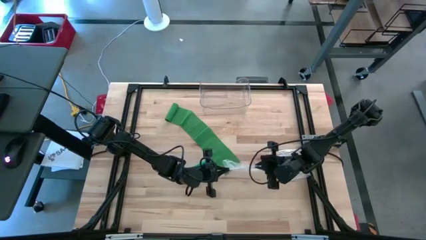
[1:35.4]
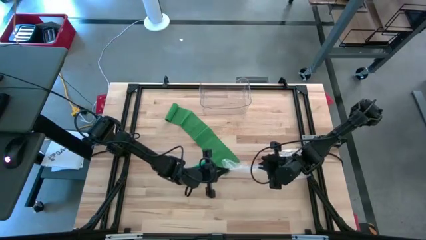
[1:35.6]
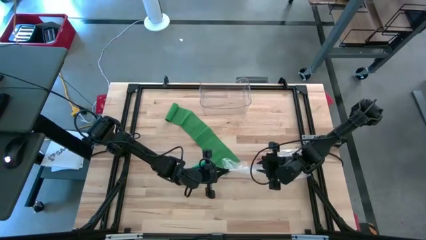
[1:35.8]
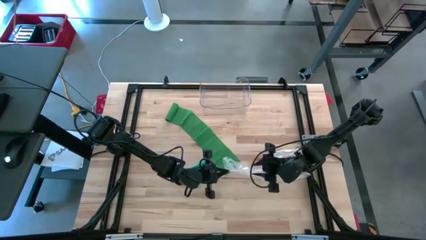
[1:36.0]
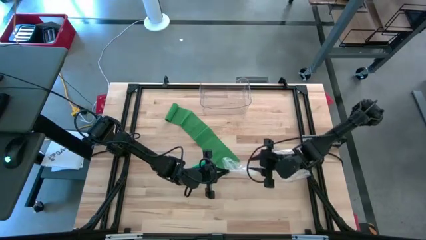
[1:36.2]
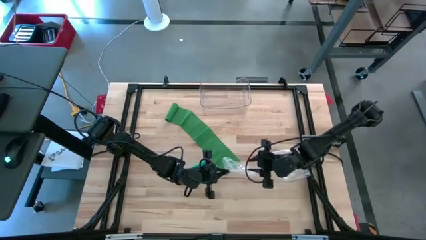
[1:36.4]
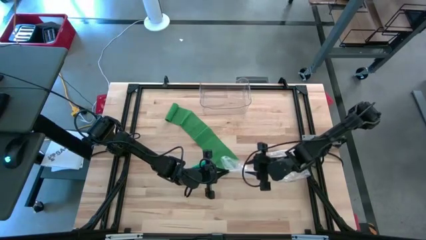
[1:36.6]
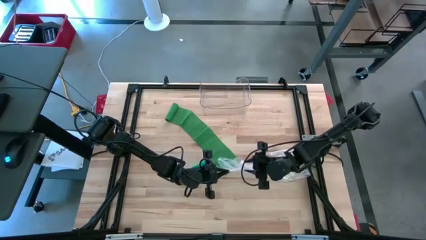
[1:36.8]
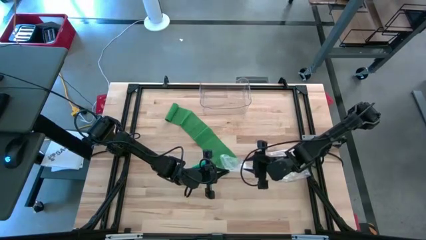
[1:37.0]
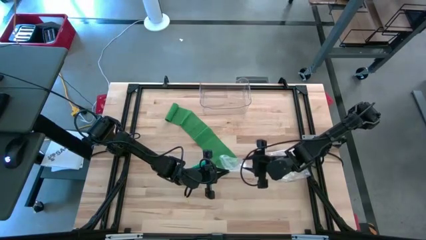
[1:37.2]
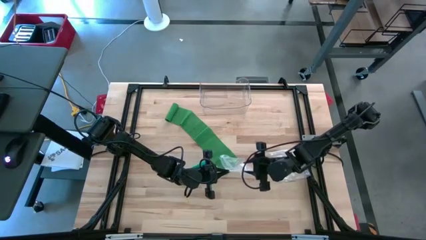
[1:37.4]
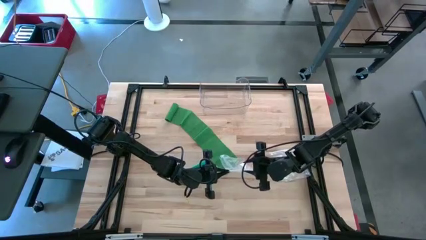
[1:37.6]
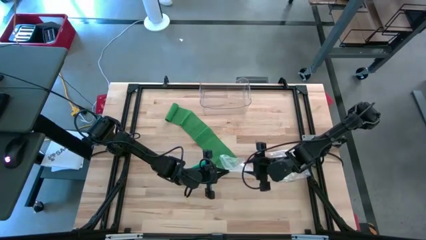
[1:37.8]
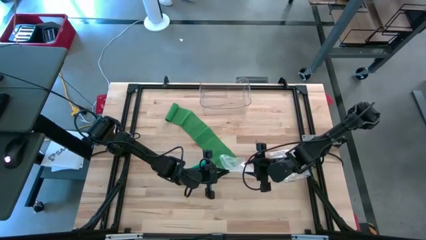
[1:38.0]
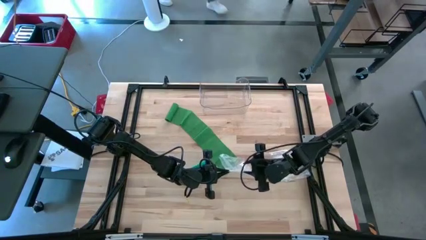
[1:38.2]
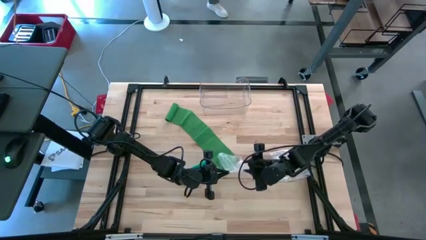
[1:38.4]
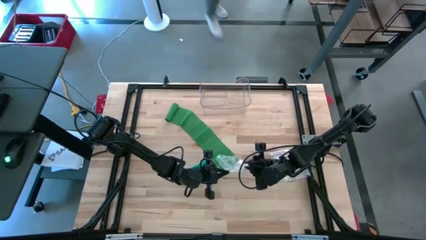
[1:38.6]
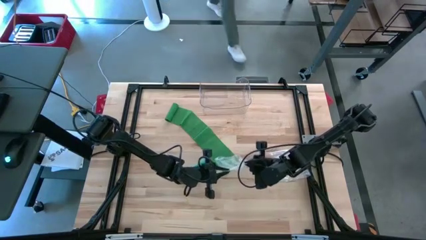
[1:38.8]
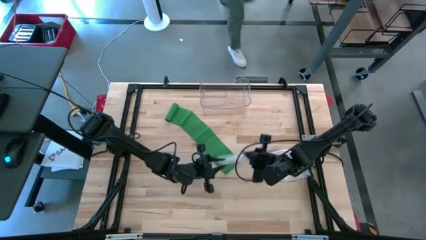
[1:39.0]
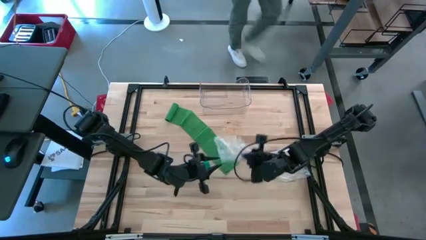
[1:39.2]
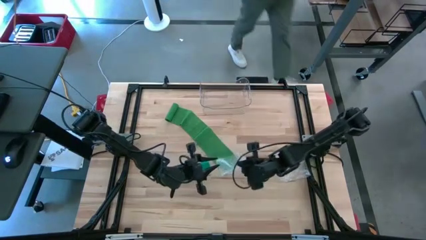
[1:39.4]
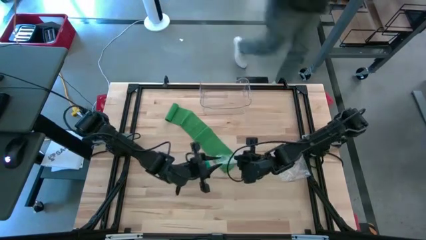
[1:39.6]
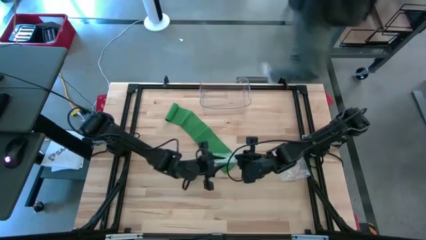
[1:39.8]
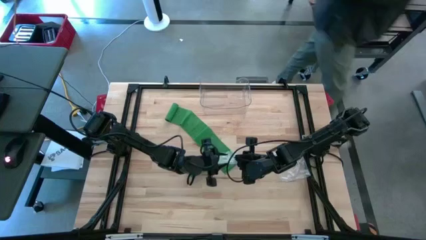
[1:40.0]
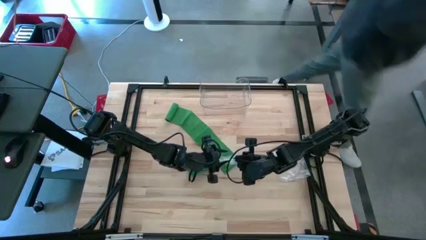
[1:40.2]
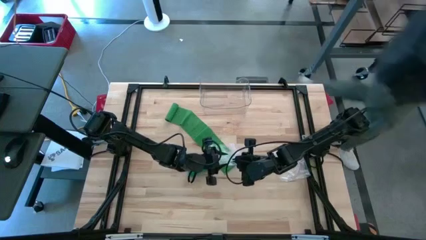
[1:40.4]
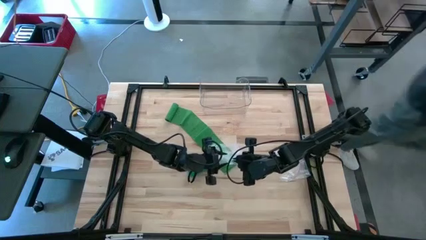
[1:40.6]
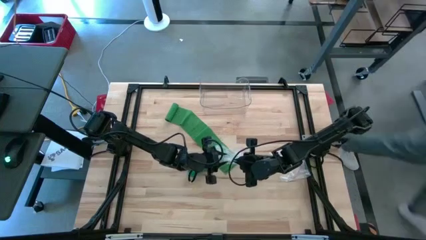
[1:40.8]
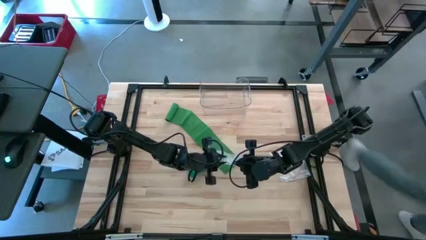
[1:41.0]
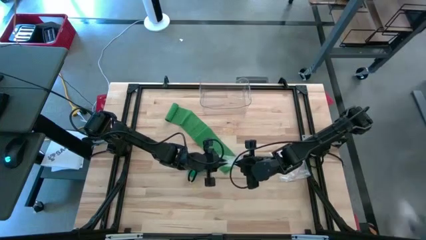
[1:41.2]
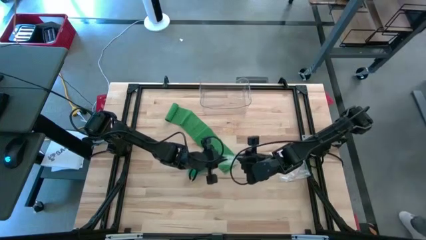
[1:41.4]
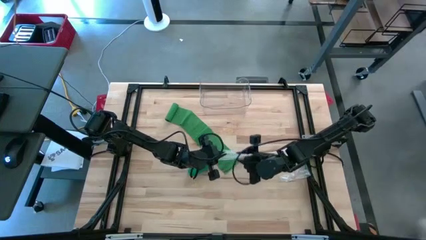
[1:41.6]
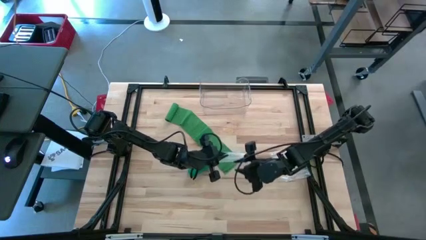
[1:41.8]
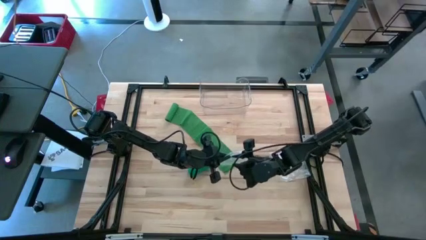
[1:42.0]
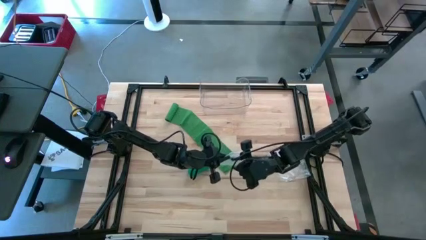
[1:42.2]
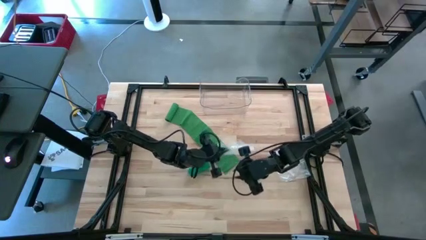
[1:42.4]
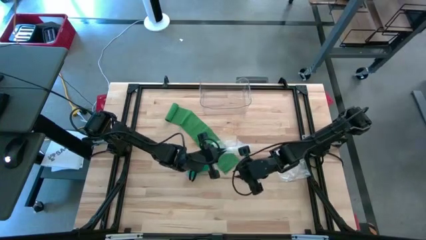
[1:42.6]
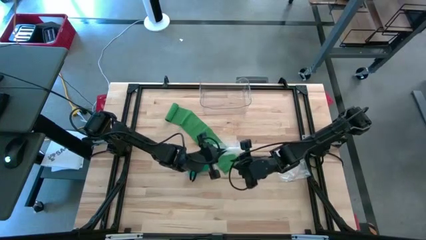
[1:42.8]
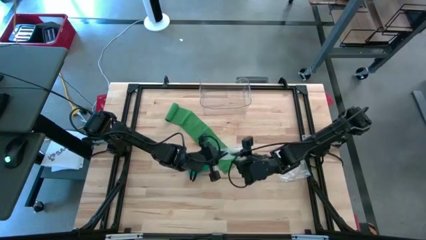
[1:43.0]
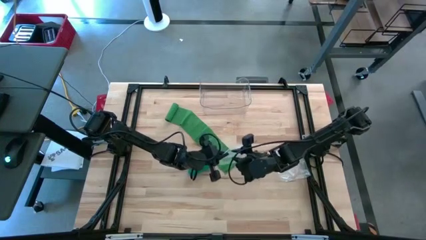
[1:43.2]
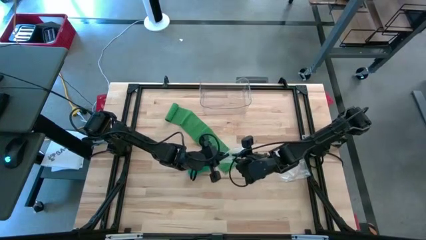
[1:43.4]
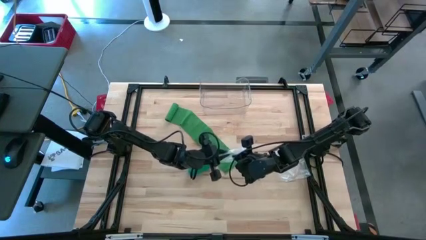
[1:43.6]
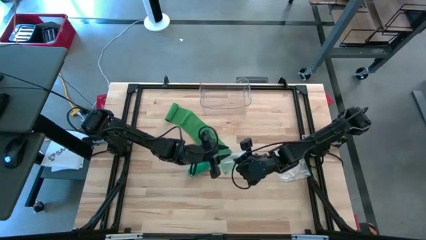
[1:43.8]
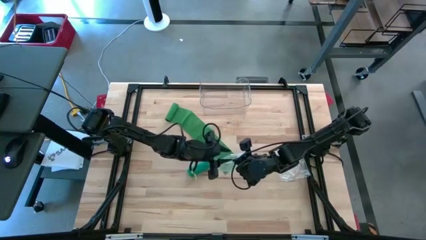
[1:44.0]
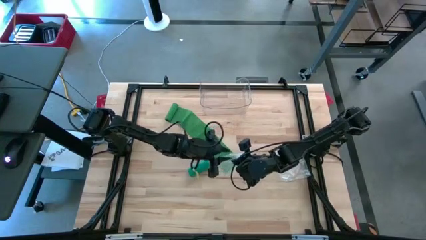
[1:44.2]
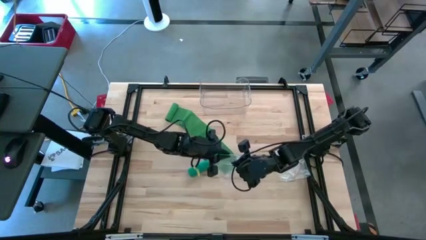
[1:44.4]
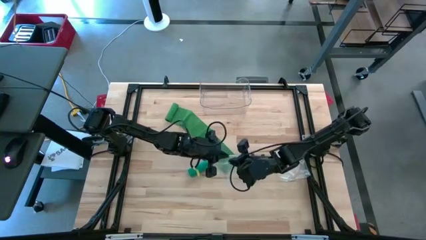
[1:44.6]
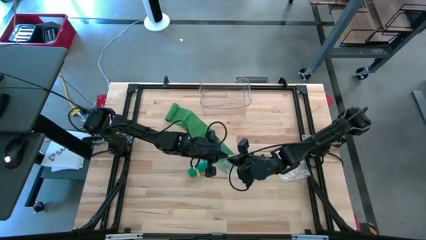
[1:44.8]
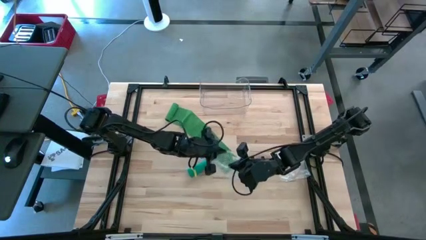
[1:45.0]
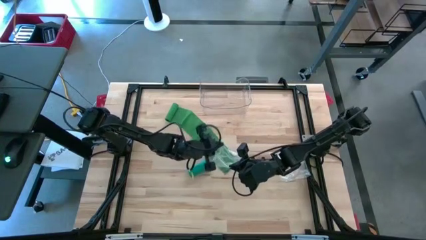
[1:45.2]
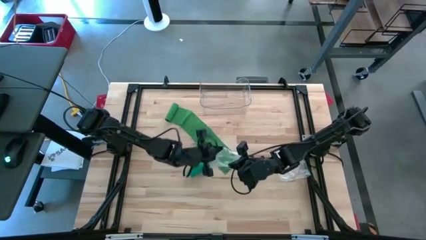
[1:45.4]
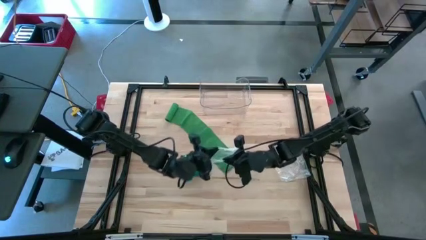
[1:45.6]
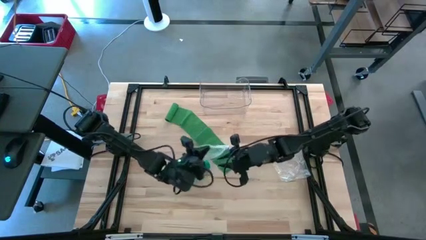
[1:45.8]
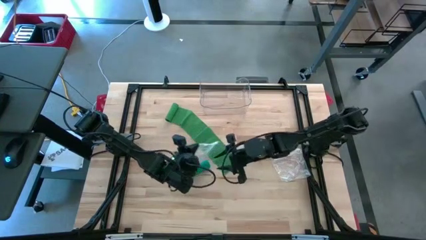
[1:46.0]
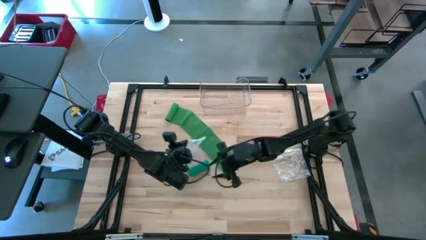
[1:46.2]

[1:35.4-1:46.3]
Task: Roll bandage
Open the left zip bag
